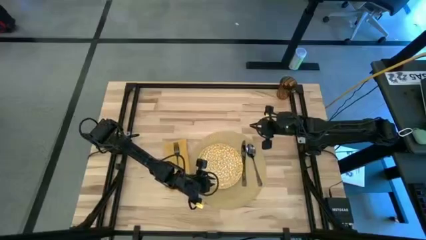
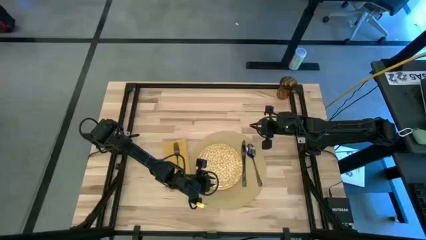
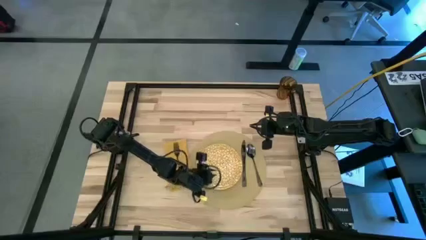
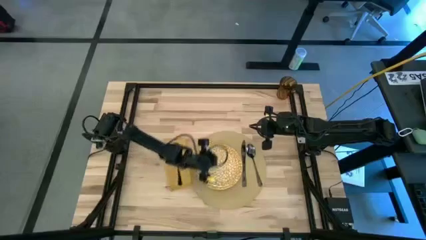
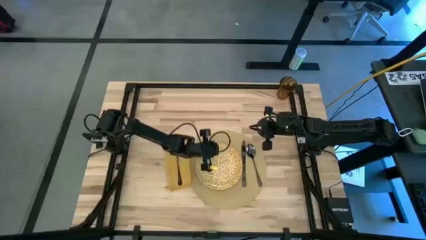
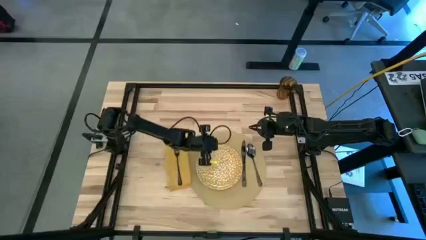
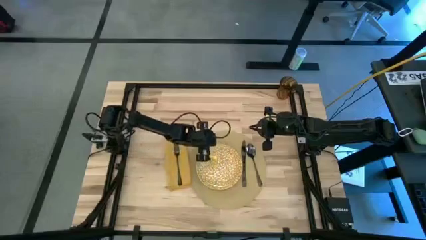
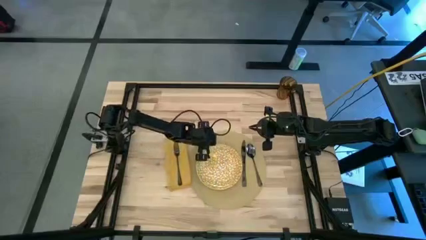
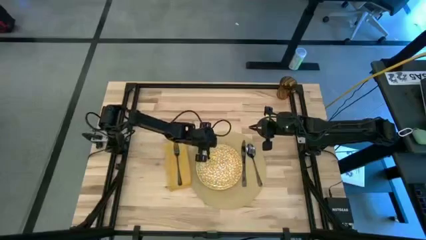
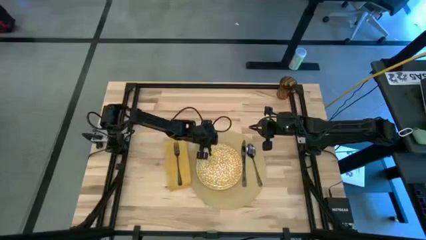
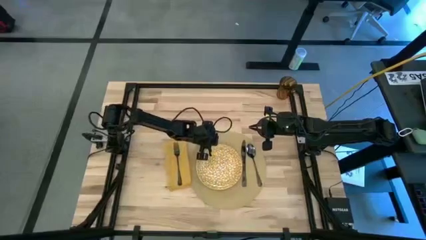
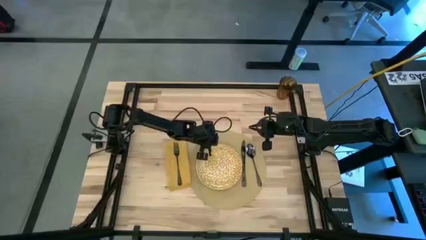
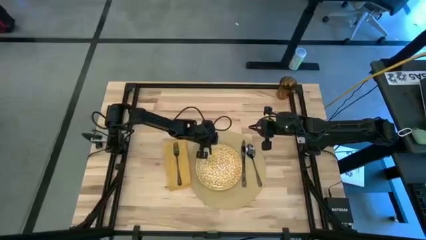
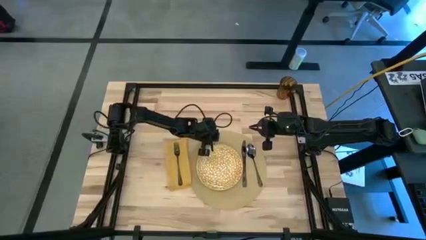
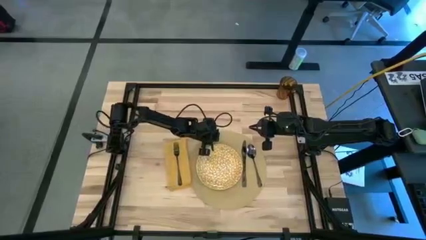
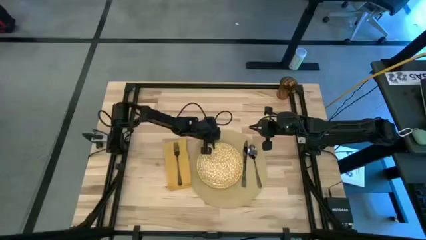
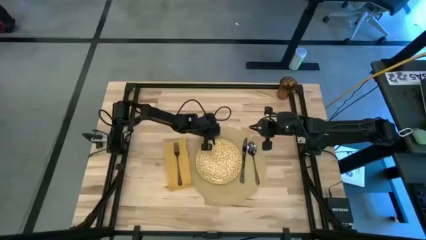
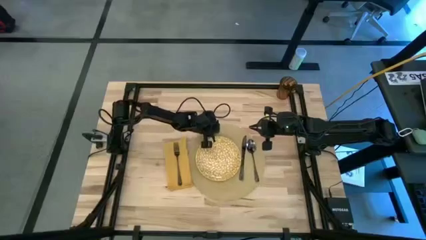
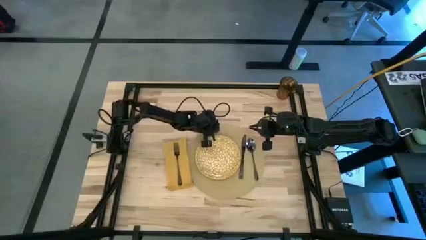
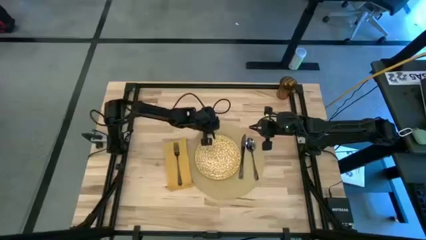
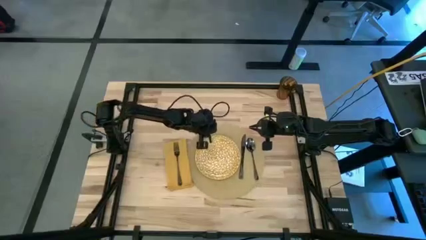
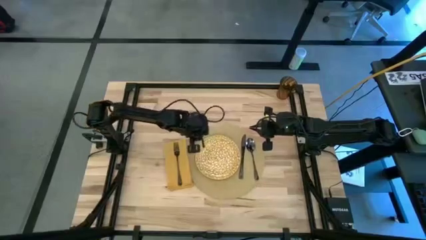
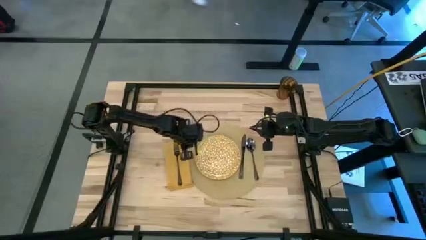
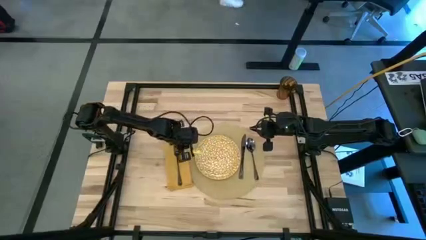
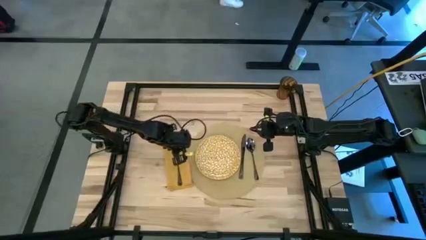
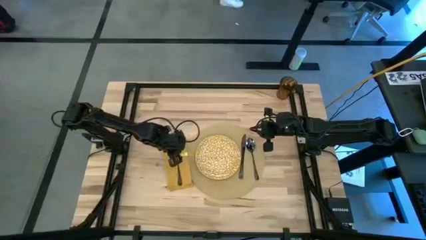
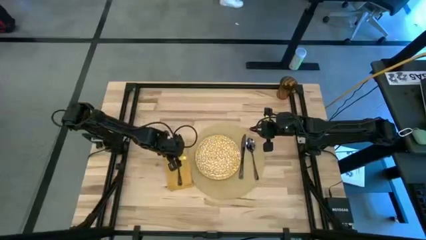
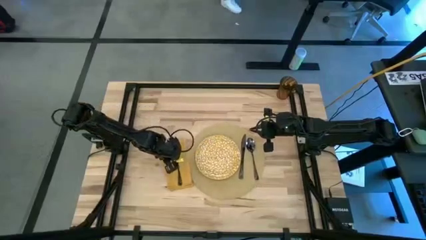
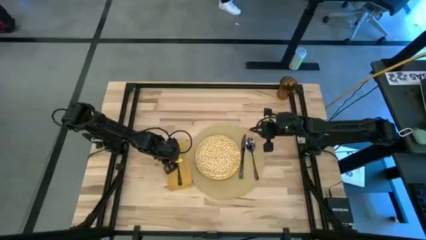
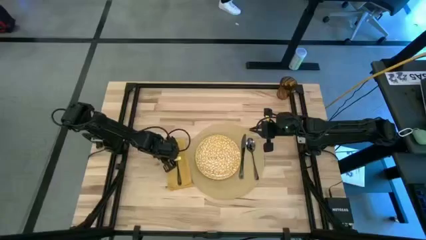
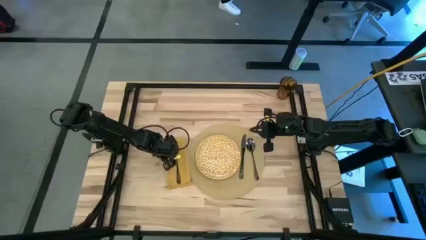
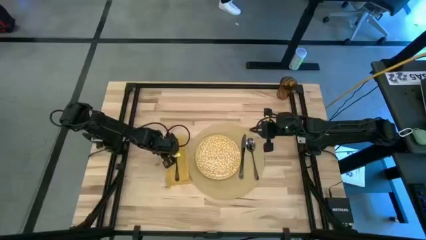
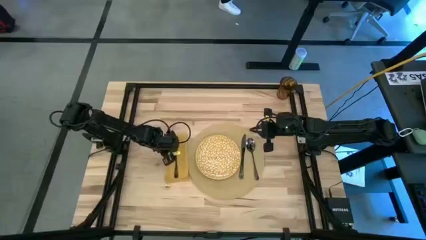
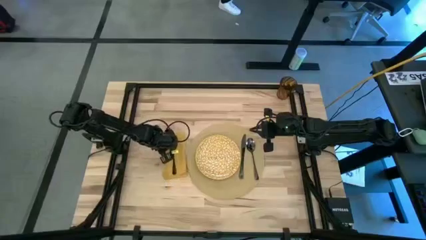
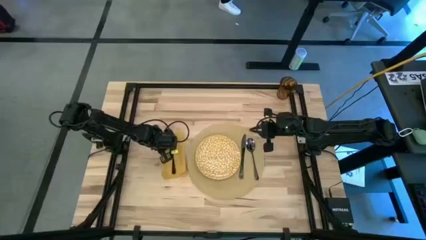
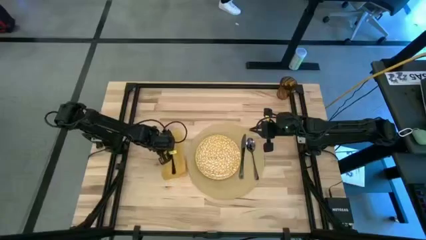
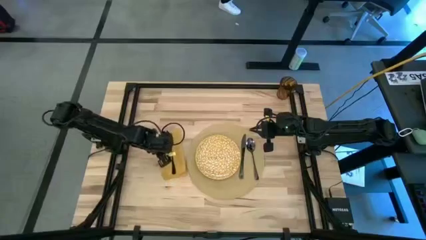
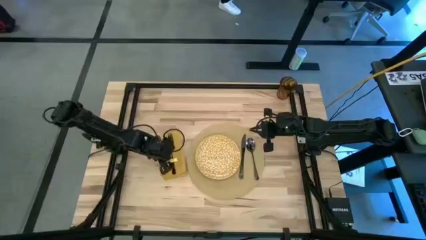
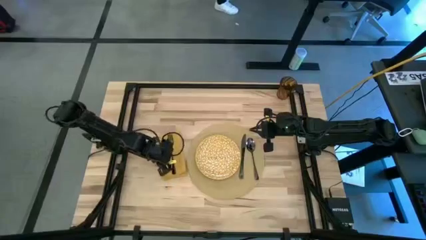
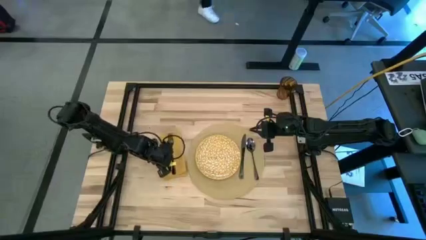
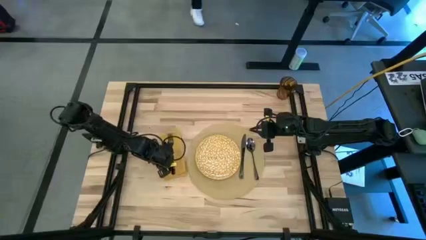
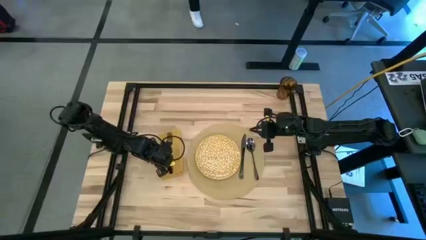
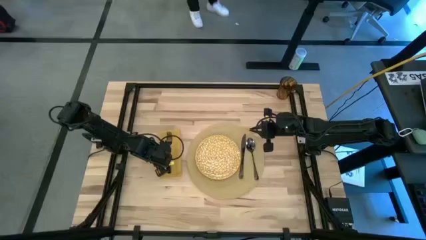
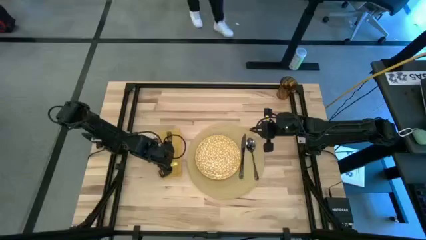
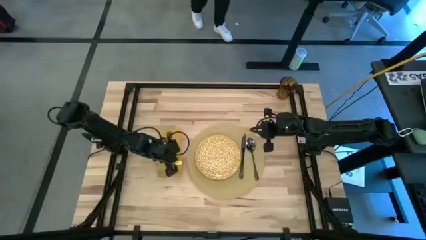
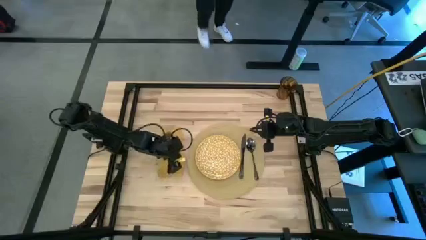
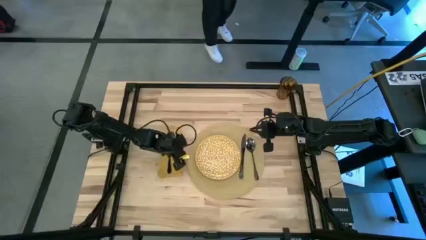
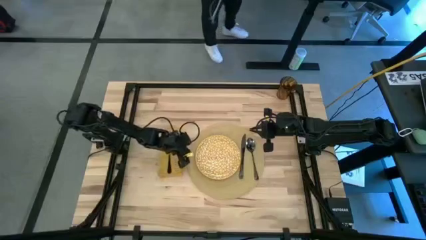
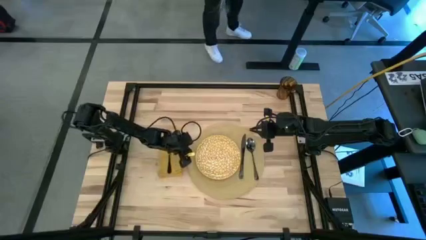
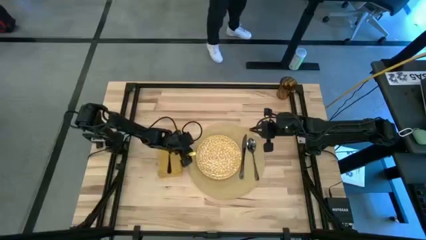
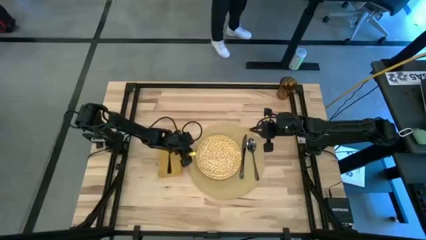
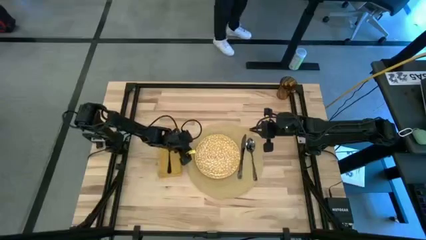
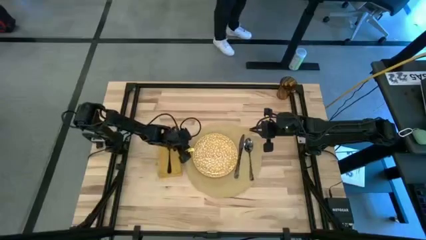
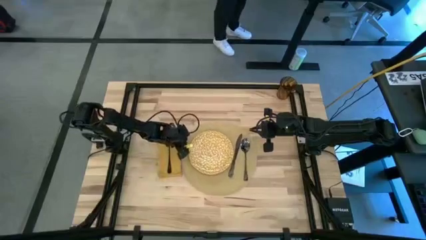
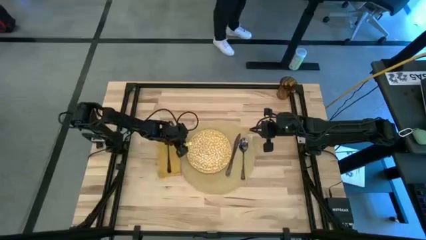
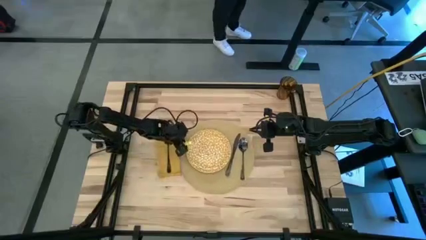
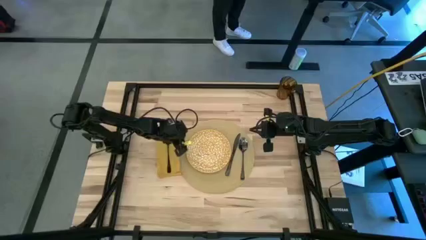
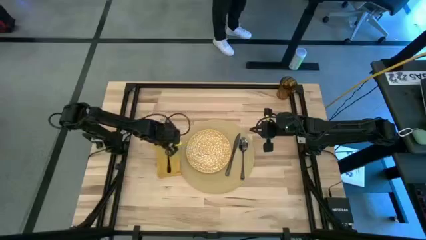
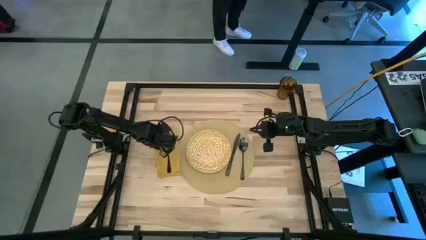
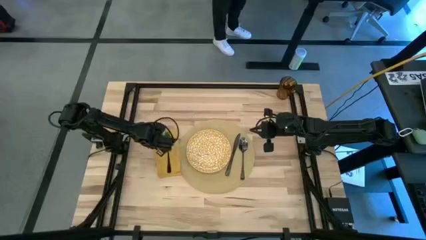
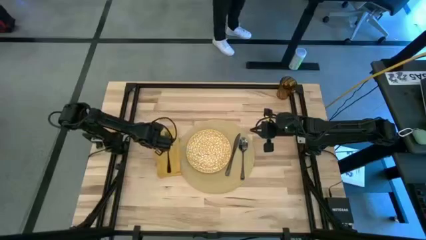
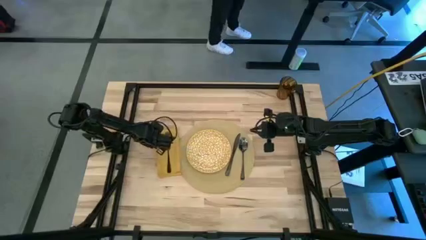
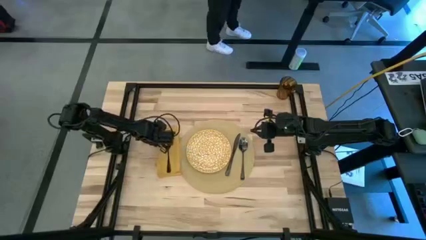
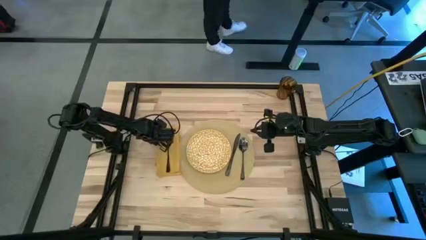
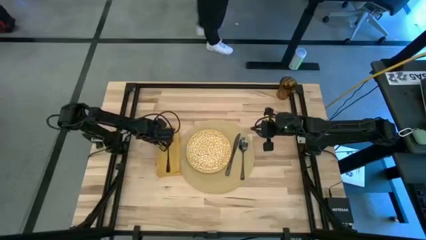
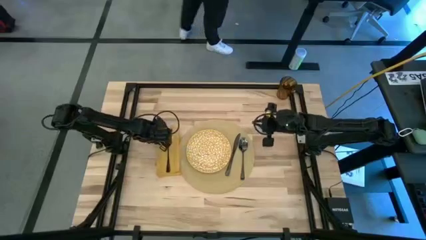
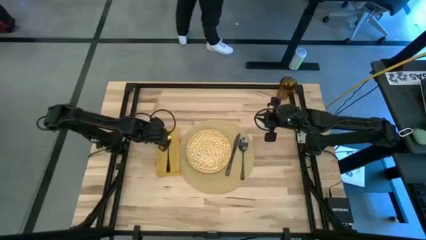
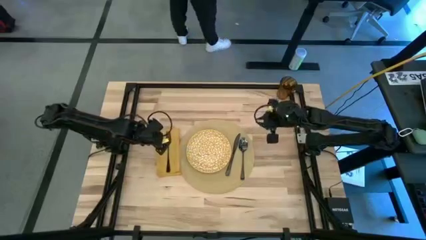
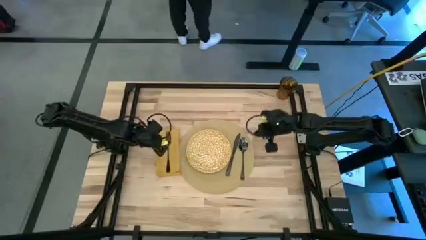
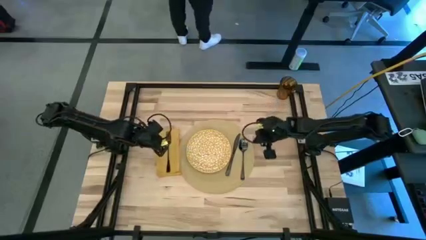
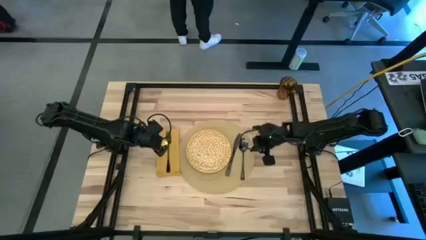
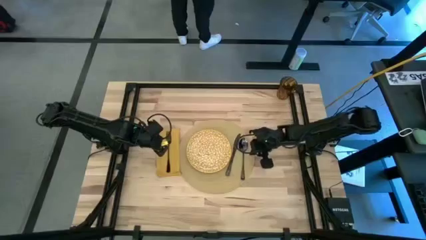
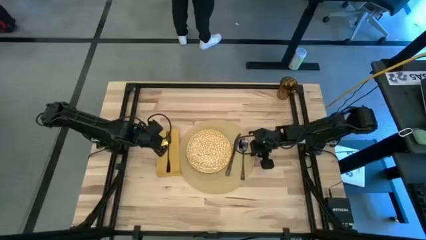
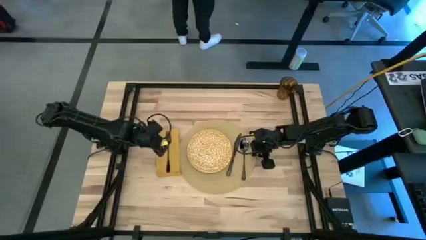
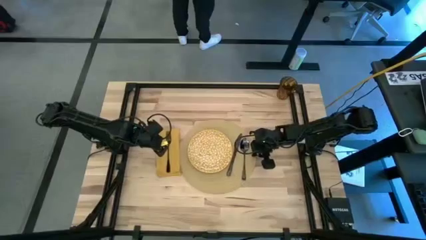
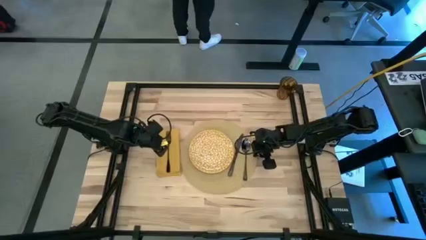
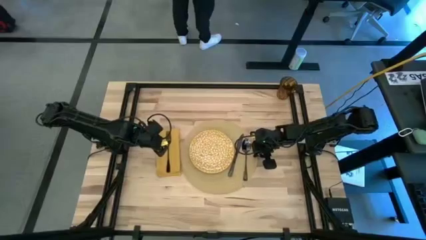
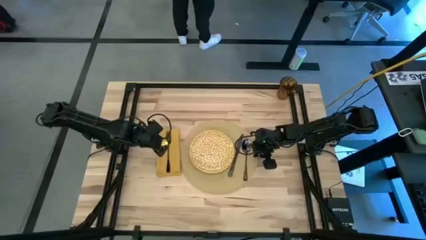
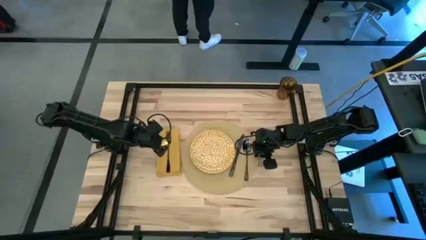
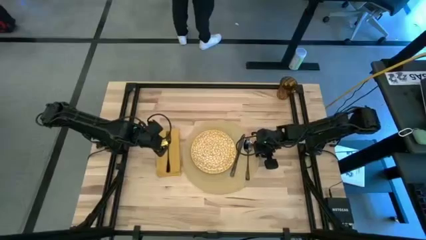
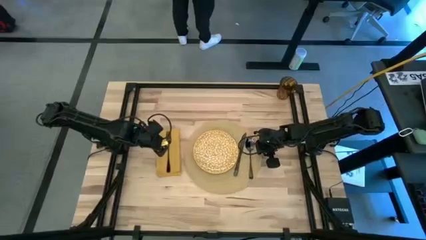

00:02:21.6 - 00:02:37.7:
Task: Set table place
Adjust the yellow placemat and yellow table napkin
